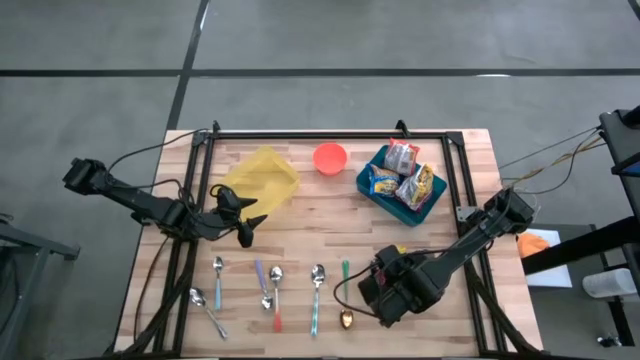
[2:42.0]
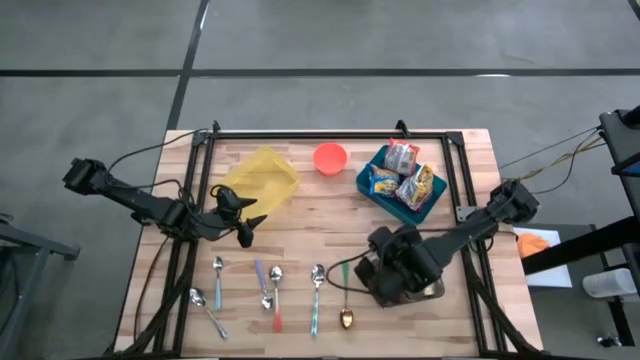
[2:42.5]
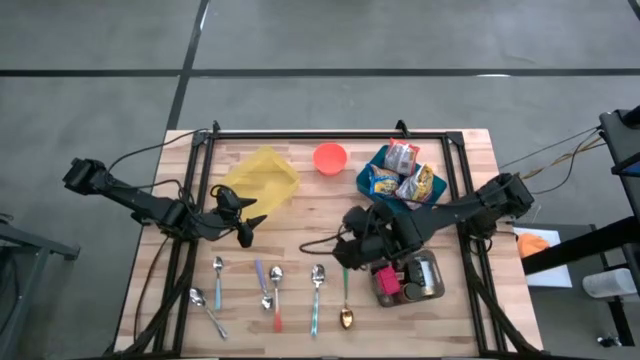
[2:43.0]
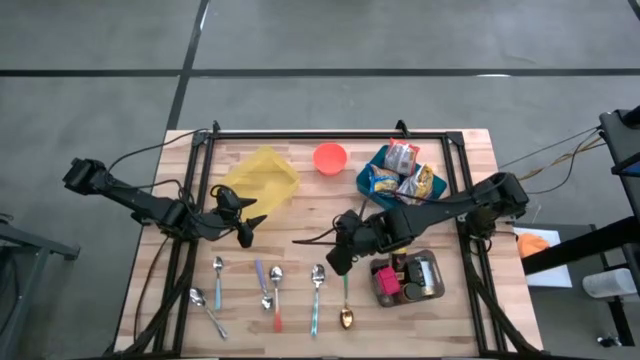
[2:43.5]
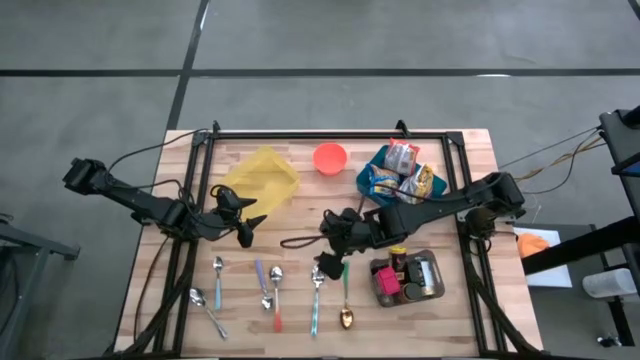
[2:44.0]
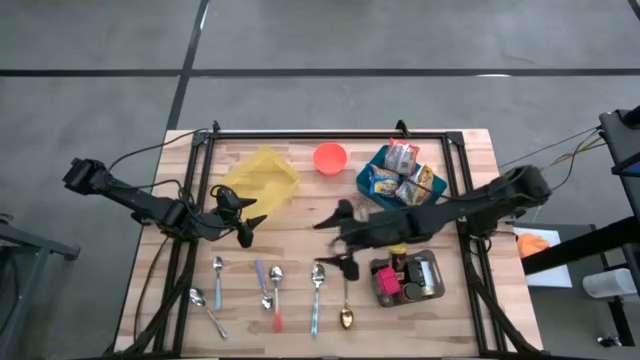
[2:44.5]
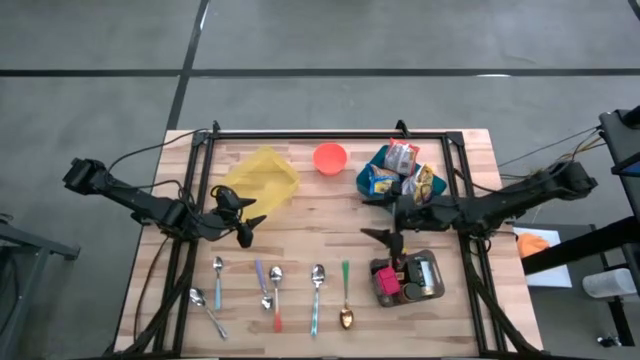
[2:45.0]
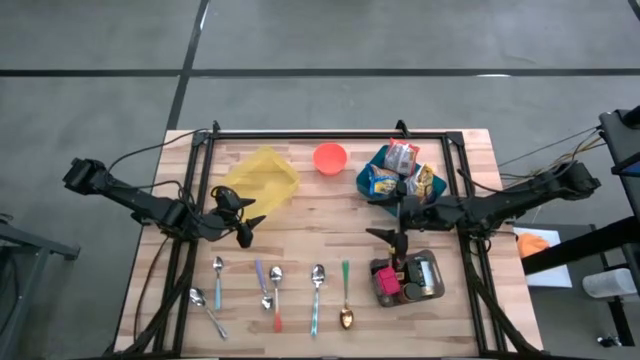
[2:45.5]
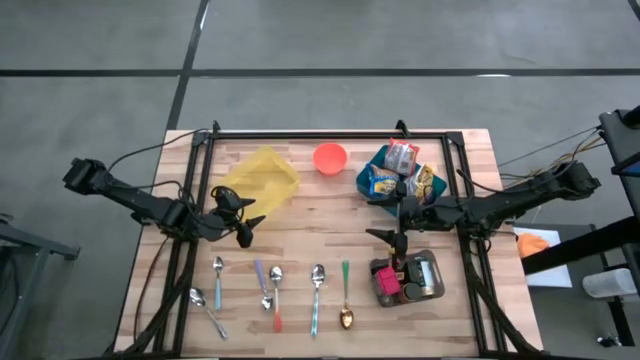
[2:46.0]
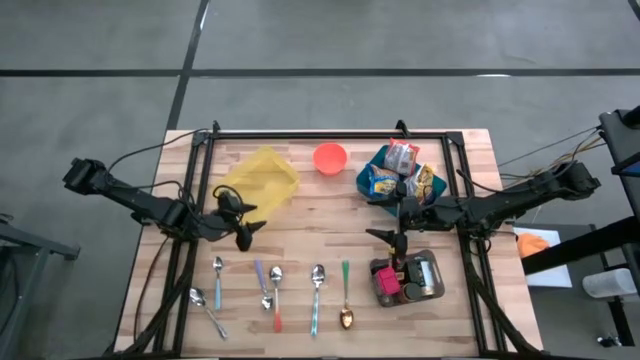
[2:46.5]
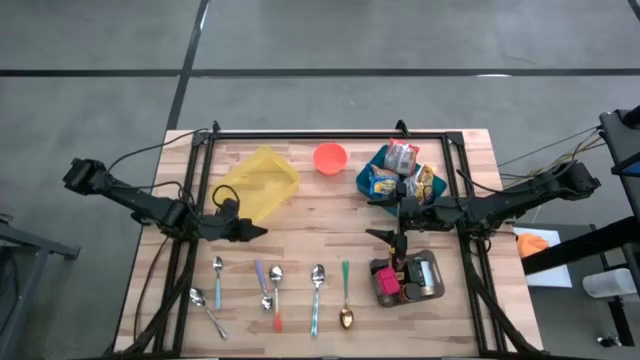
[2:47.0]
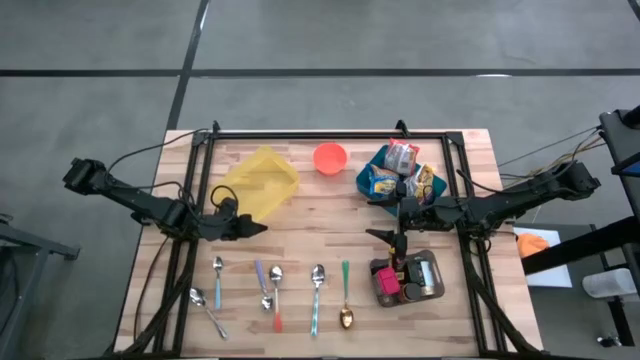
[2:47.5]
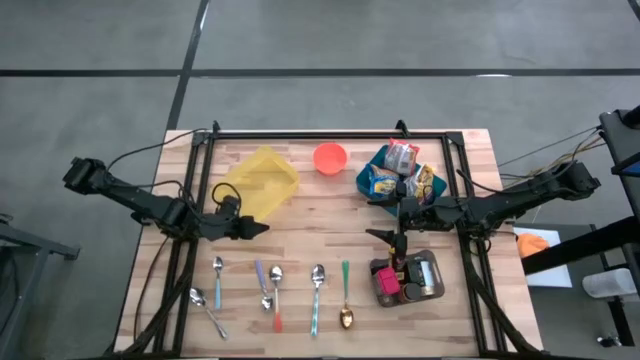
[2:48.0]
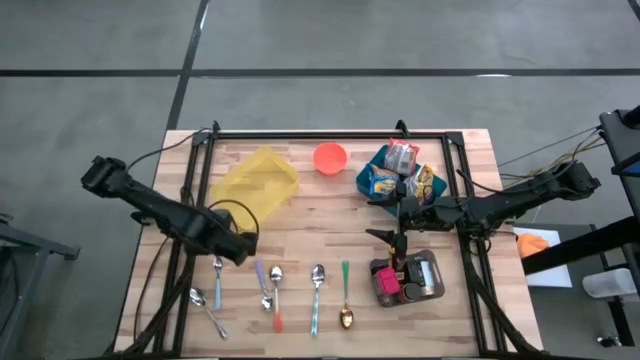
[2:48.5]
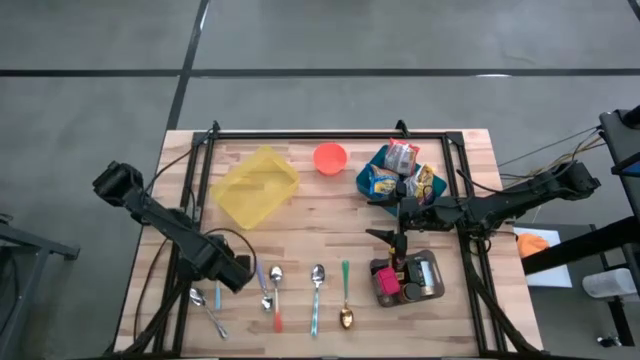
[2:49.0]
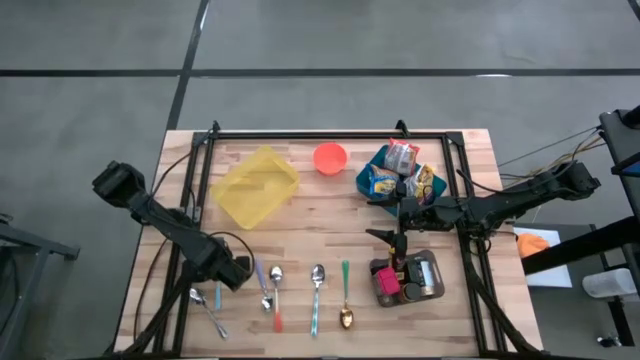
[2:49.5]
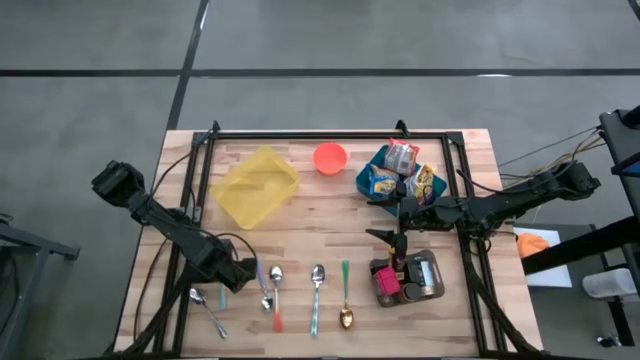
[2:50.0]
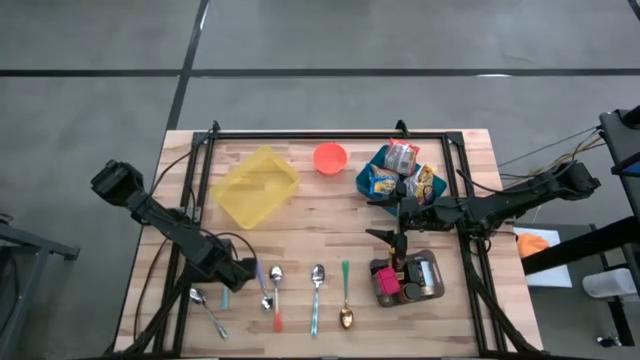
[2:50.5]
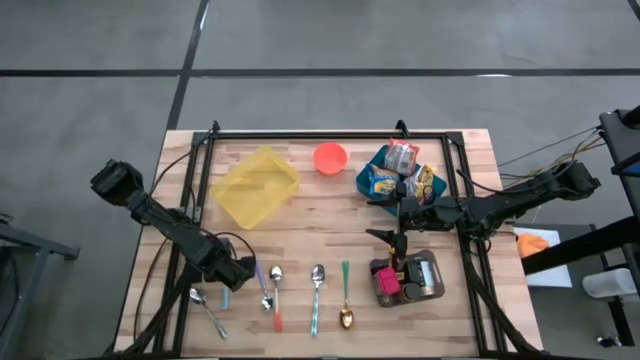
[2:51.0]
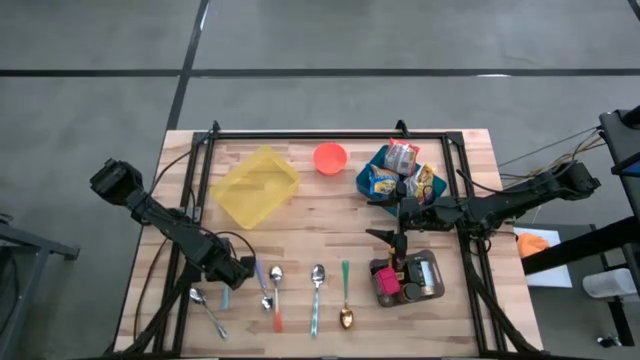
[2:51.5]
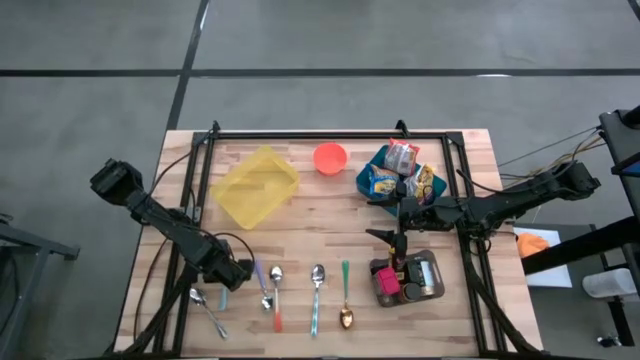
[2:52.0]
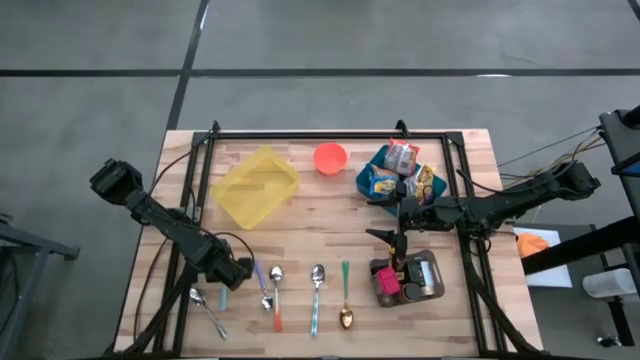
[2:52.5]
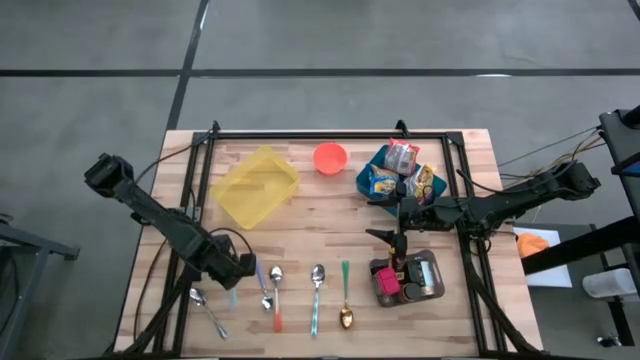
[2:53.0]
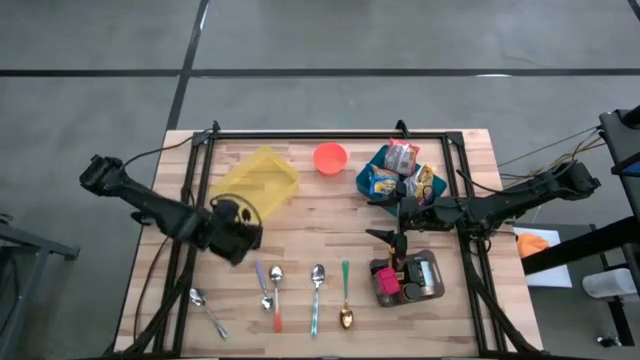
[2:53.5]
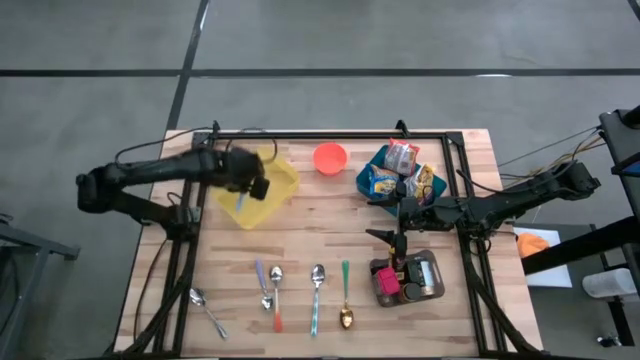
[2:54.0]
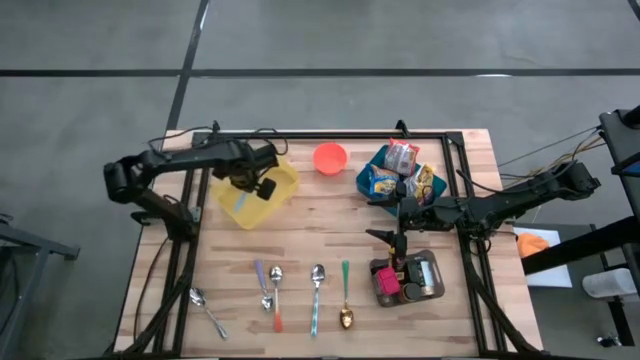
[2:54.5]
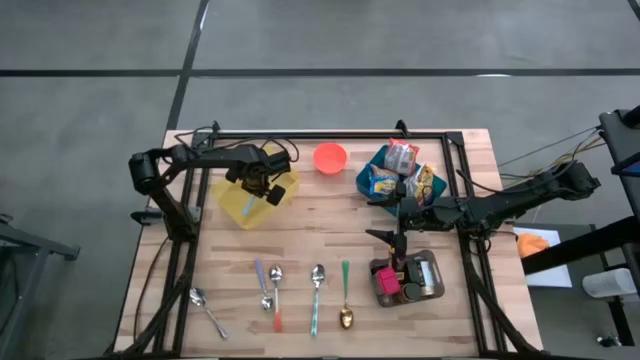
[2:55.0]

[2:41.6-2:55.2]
Put the blue spoon into the yellow bin

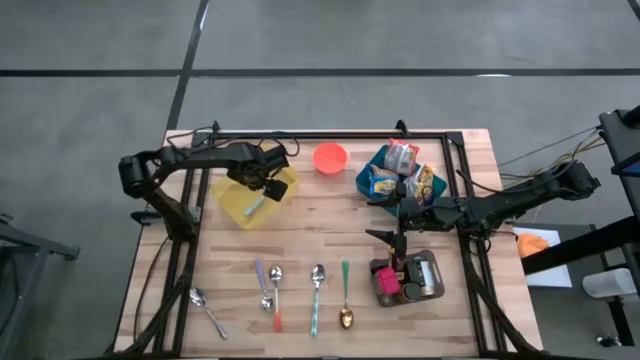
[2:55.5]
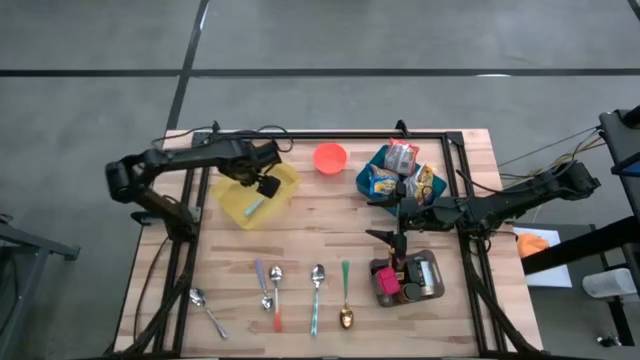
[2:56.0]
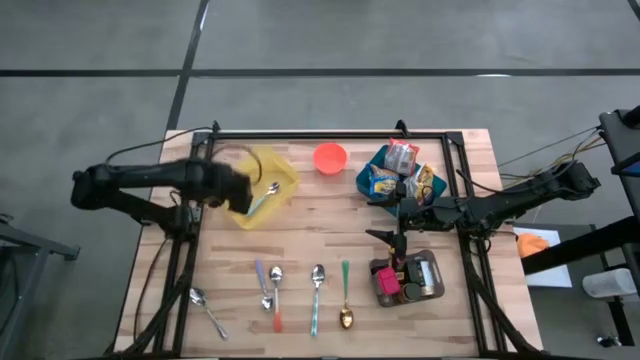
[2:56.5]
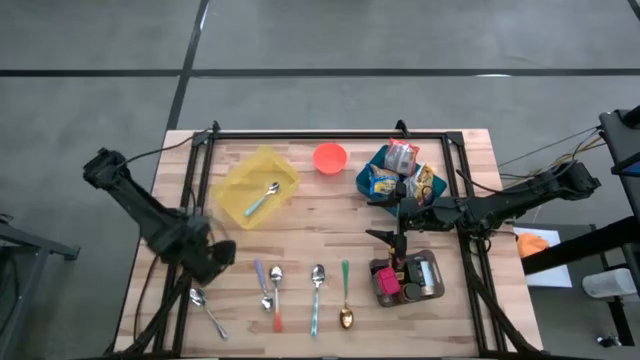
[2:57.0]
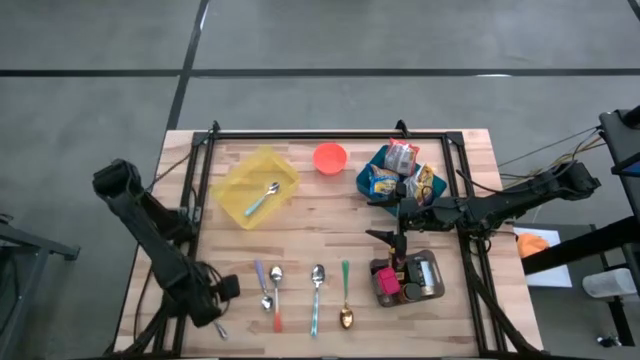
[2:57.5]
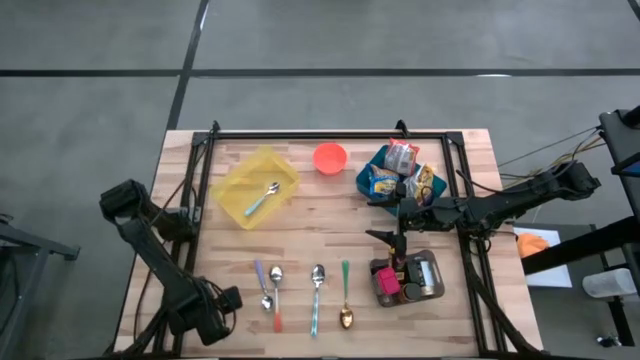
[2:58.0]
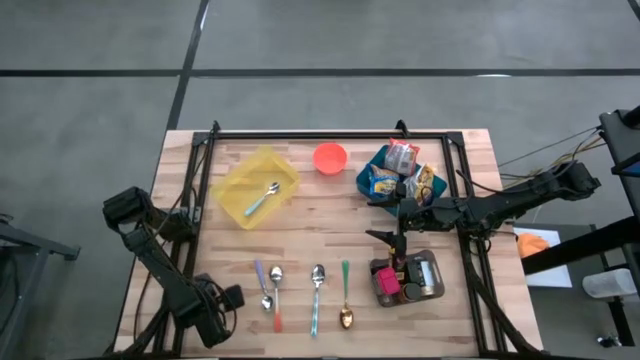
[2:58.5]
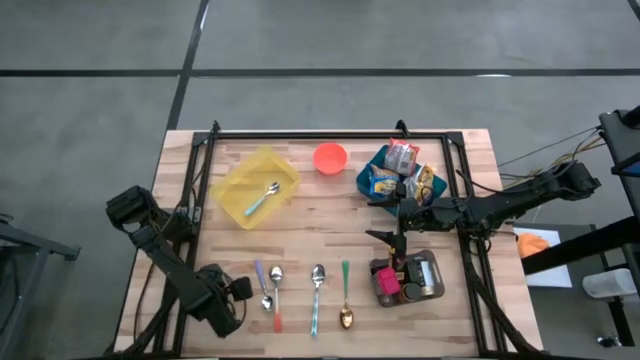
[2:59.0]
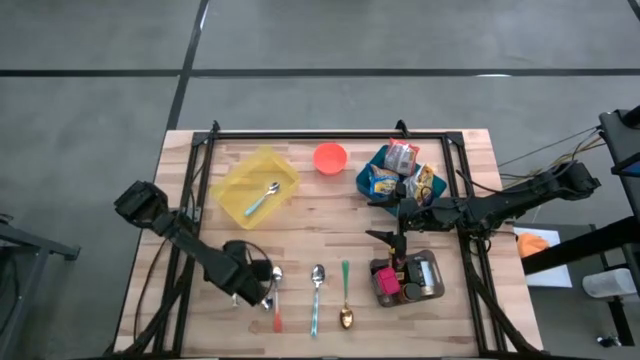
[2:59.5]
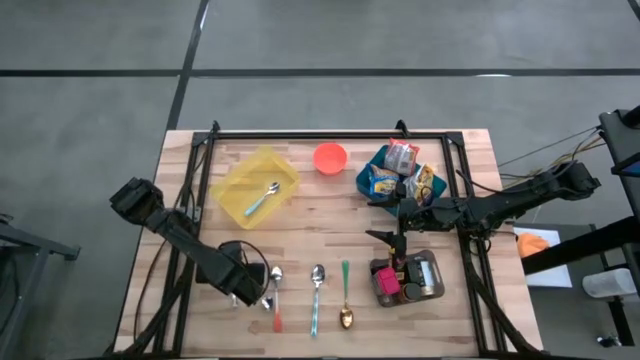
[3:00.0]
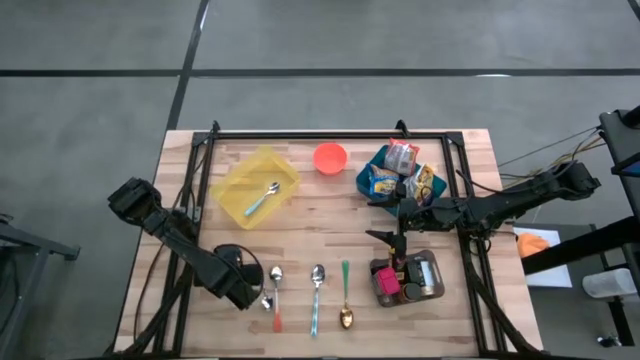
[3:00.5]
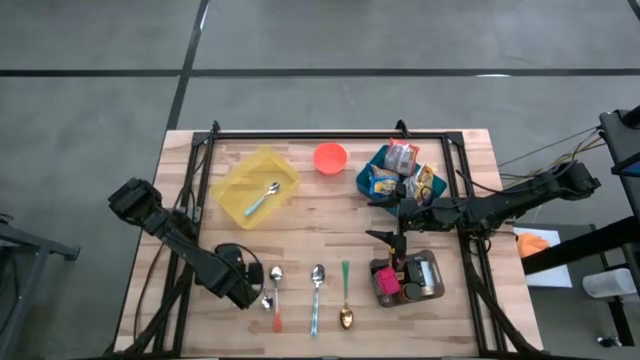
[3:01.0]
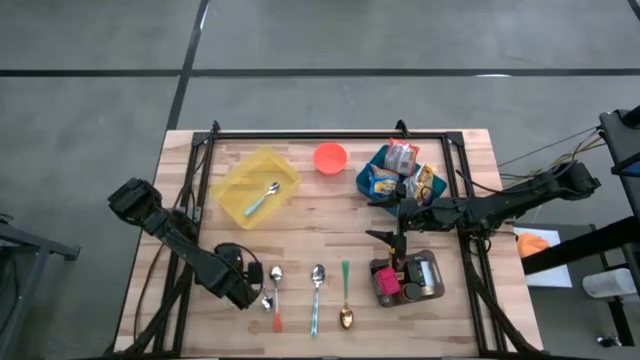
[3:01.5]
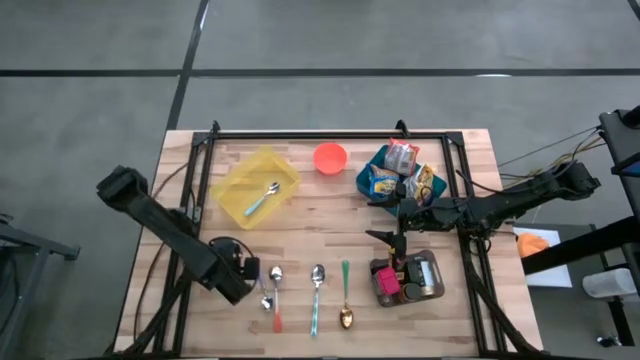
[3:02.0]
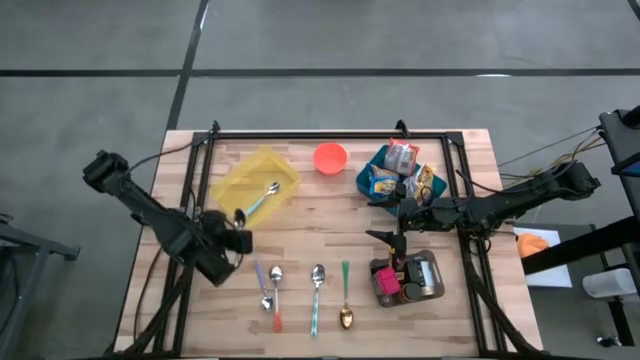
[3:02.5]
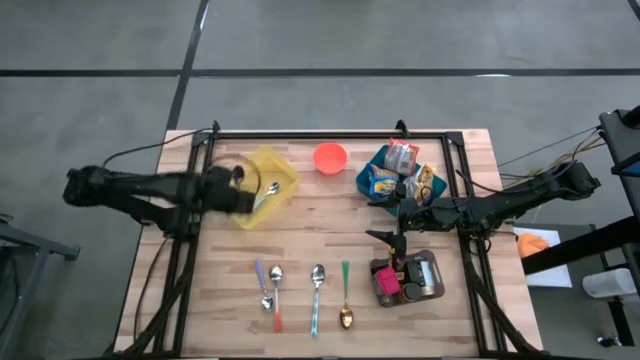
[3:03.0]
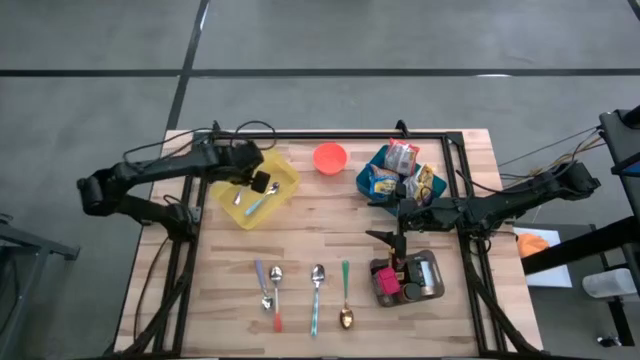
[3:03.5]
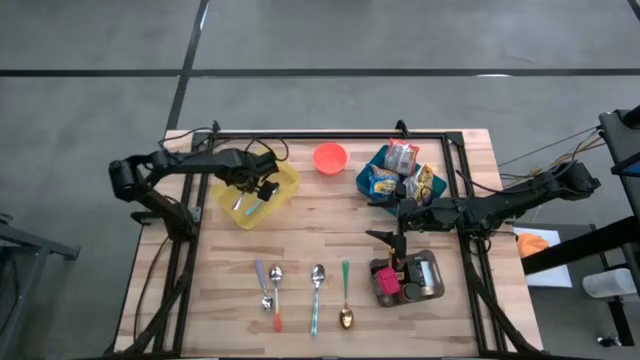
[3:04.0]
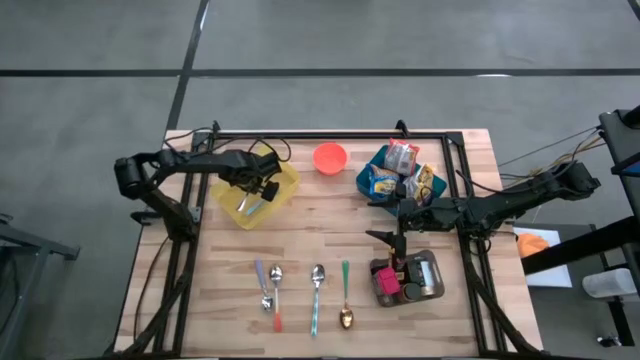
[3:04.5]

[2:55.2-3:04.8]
Put the silver spoon into the yellow bin
